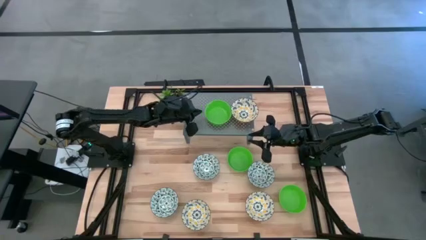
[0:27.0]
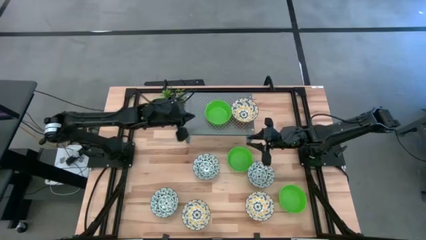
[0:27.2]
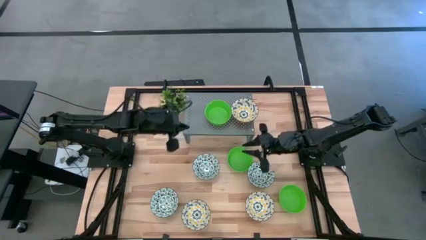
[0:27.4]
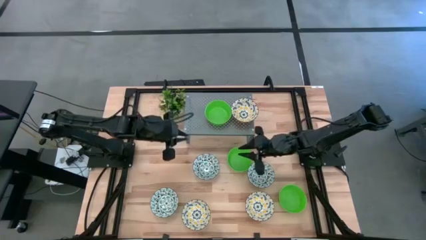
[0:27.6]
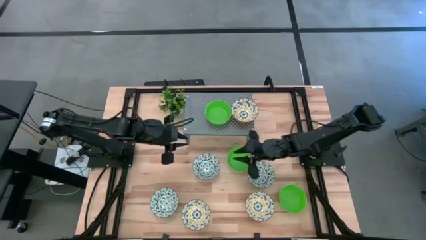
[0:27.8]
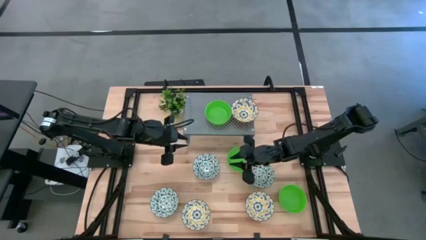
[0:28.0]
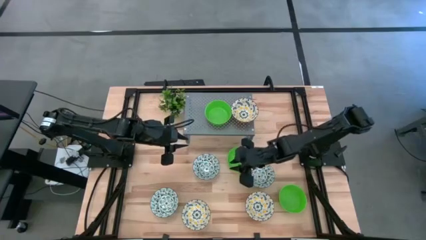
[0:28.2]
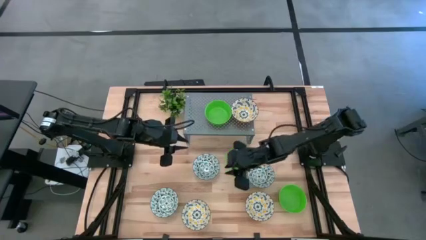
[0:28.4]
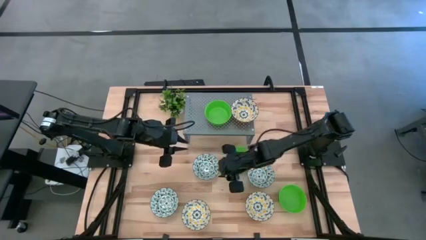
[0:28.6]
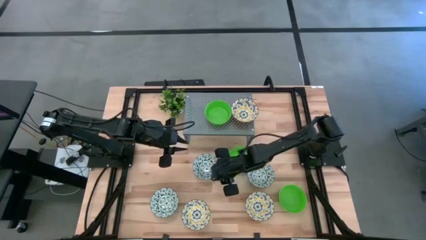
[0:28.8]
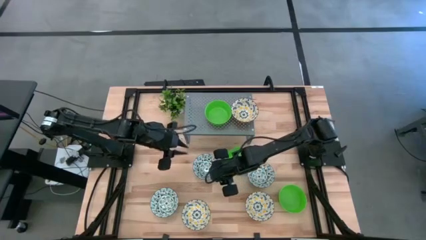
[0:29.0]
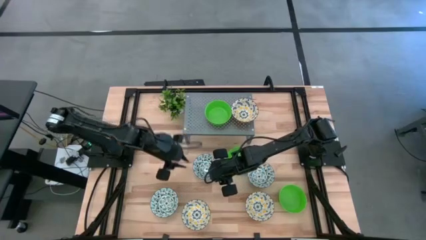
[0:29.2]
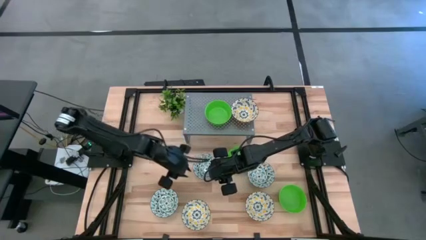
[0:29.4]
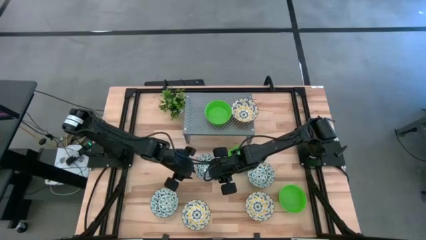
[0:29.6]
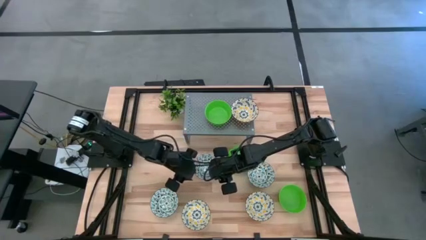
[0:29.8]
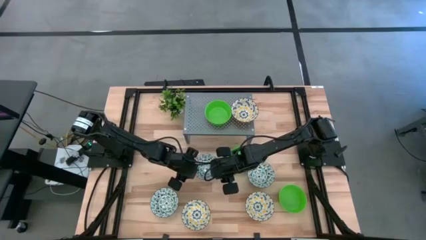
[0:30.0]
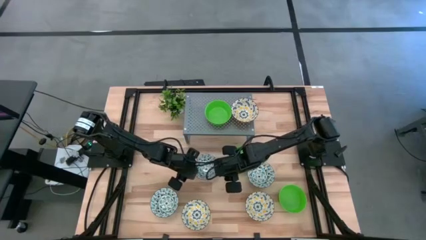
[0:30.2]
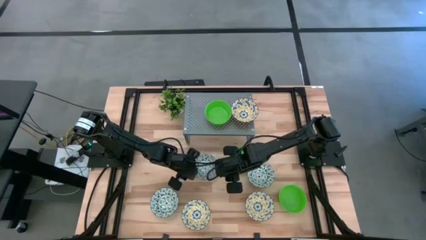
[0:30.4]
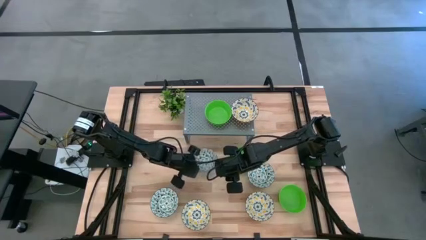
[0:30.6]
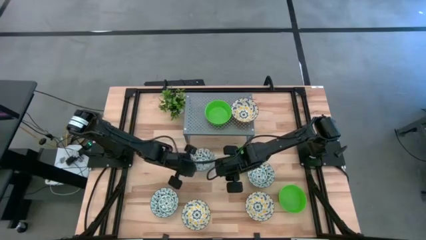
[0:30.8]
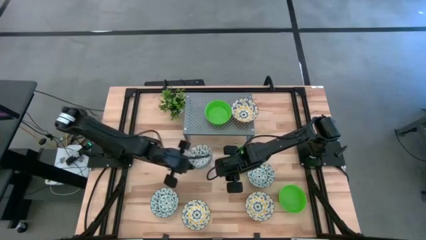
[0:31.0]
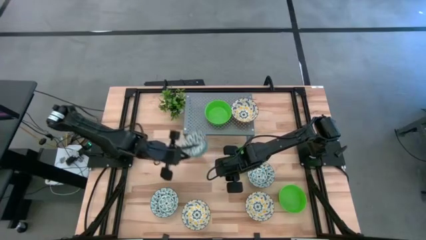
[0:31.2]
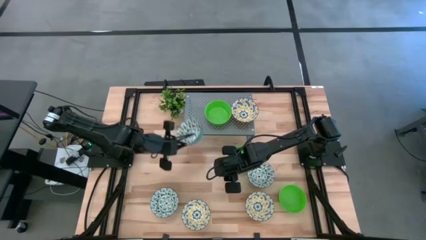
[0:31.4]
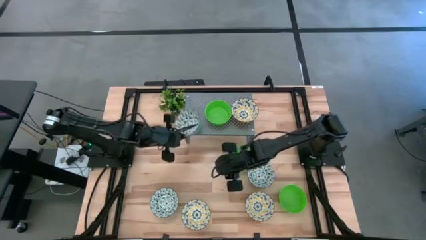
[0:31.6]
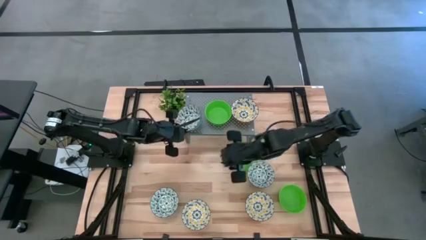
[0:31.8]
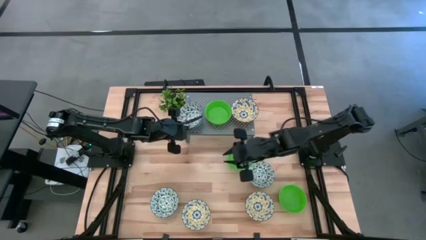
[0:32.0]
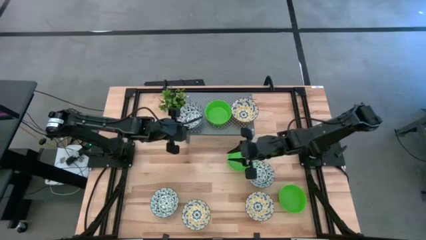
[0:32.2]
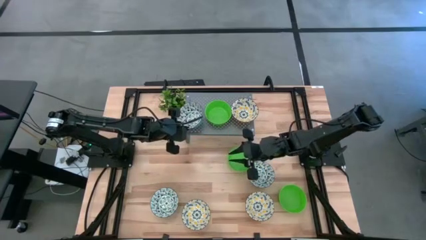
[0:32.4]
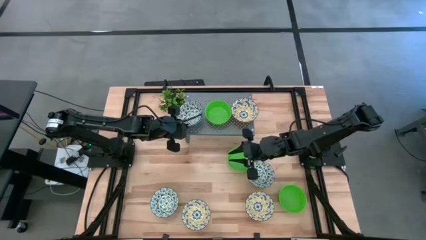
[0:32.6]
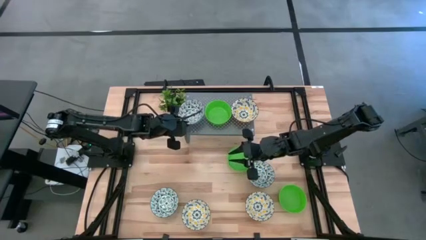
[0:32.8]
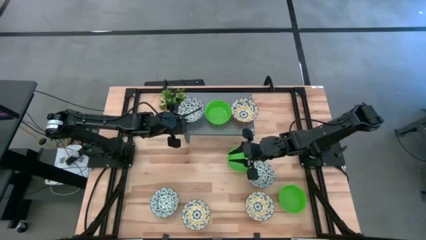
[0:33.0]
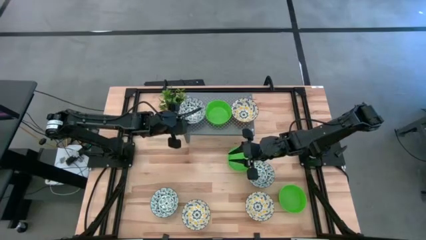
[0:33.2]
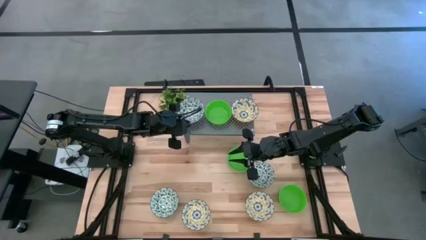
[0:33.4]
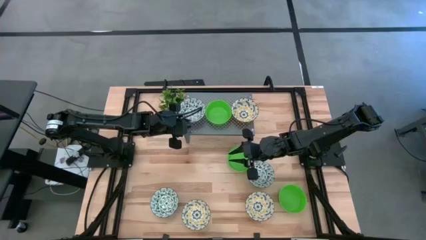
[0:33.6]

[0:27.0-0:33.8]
Task: Pick & Place Mini bowls
Put the middle blue and white patterned bowl on the shelf

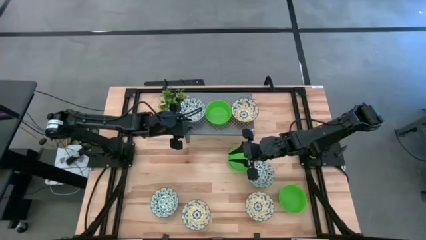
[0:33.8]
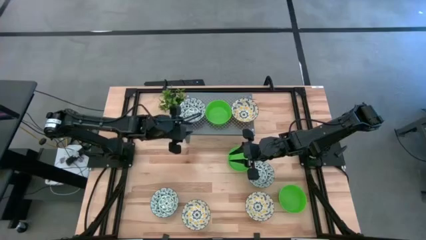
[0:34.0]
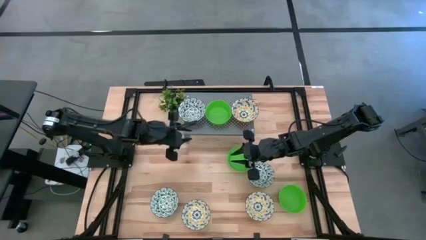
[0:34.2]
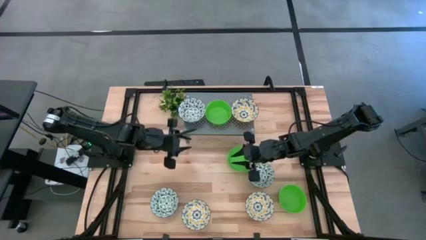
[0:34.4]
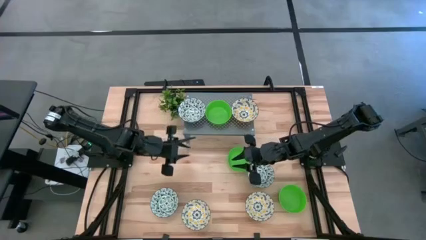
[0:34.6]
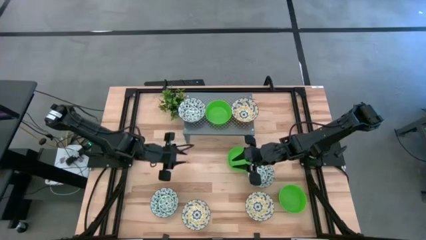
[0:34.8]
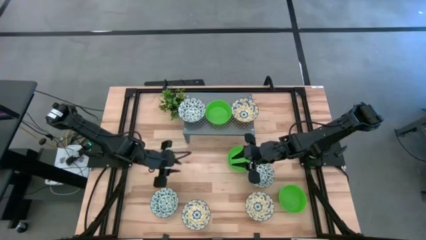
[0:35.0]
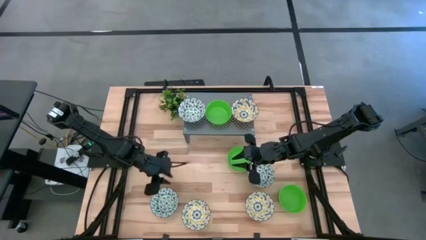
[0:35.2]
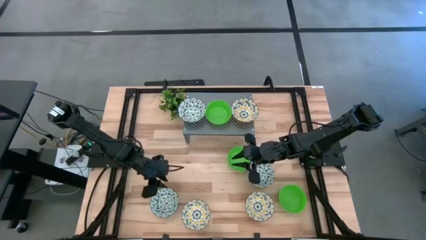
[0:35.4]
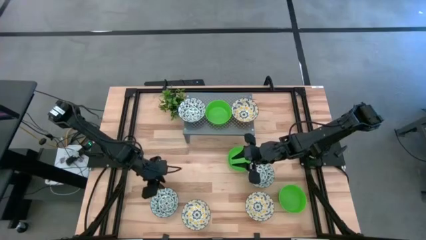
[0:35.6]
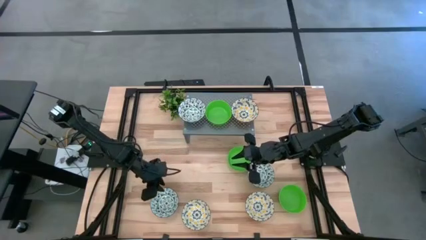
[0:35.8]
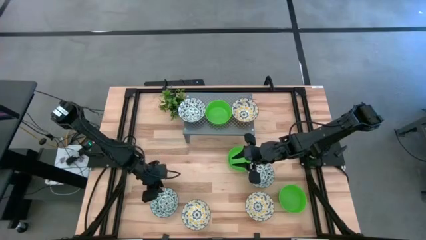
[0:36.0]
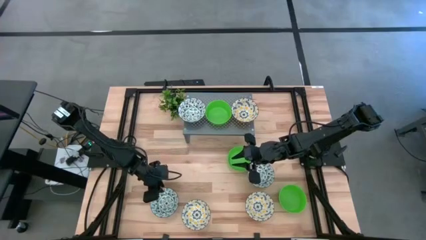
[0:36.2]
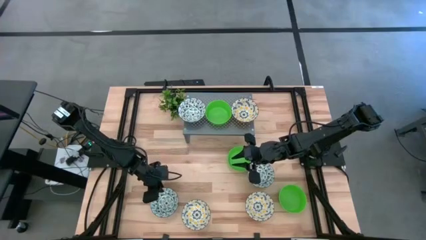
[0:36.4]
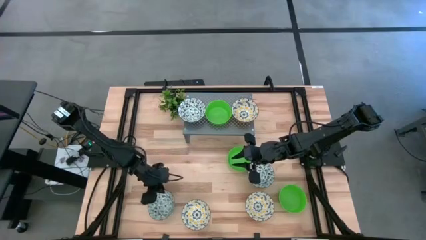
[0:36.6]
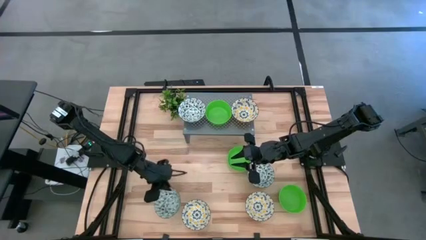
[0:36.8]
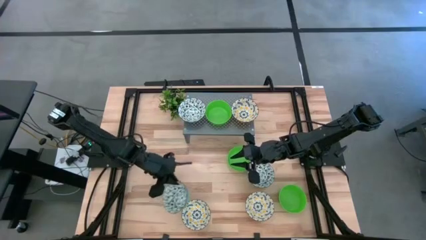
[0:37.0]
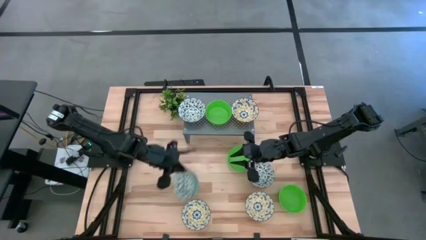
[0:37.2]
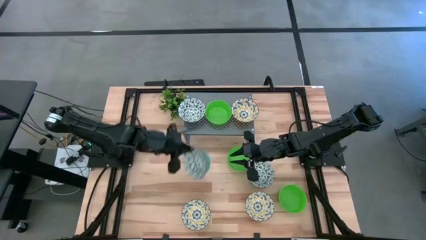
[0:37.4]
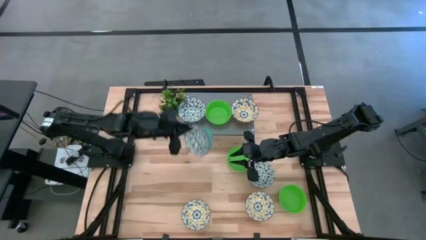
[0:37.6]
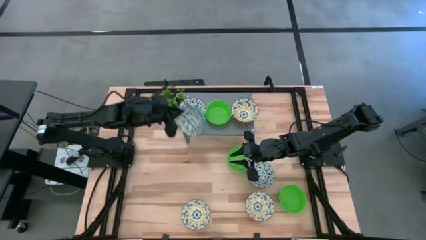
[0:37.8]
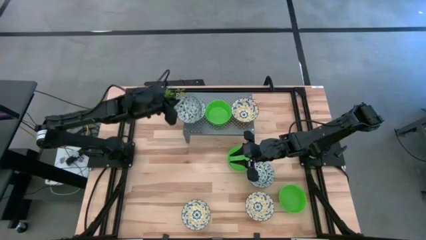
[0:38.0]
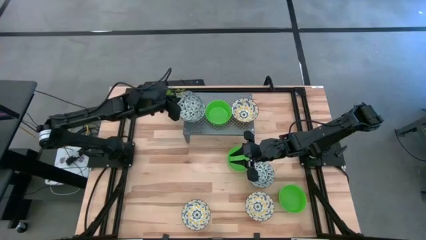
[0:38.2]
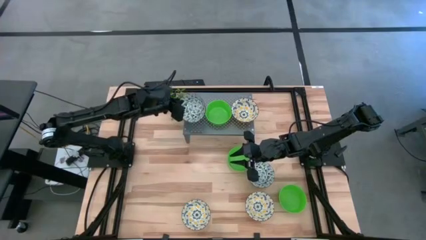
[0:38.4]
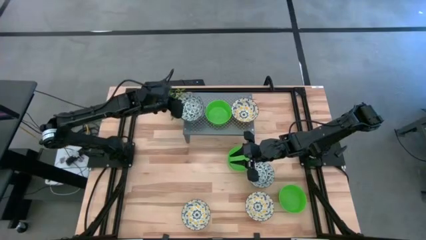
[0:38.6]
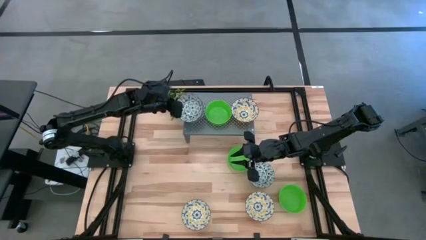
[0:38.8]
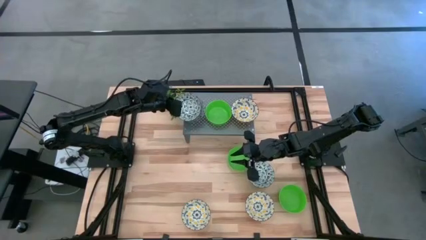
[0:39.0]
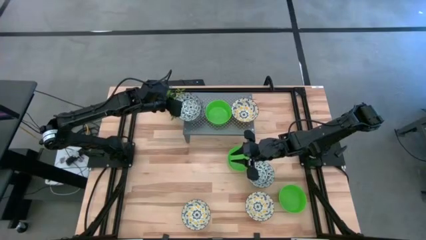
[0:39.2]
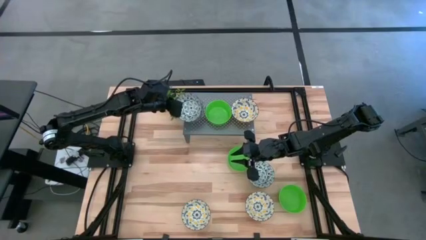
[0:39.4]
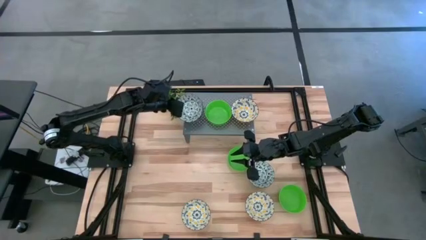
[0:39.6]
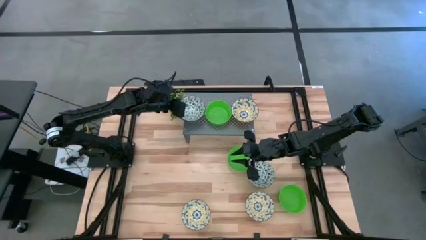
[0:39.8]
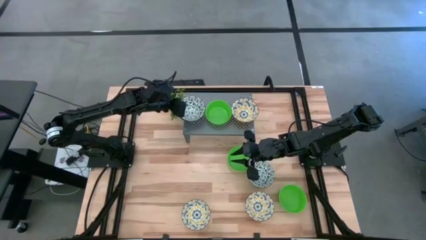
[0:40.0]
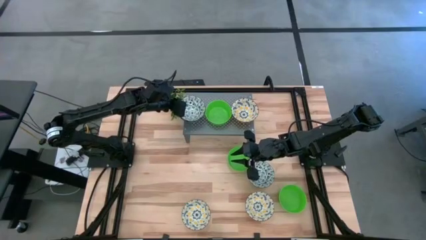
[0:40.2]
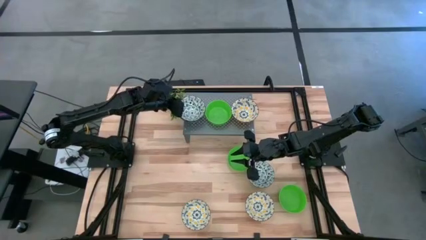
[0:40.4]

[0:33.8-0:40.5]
Stack the left blue and white patterned bowl on the blue and white patterned bowl on the shelf

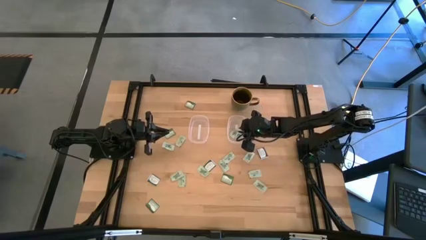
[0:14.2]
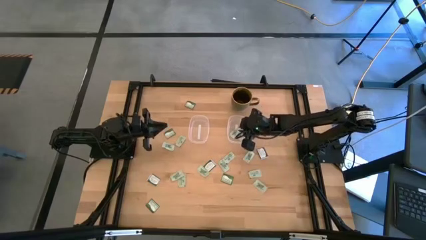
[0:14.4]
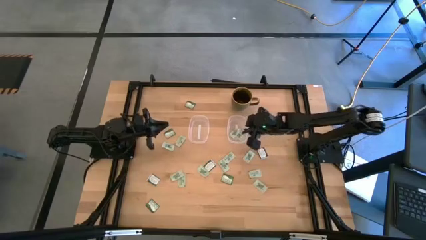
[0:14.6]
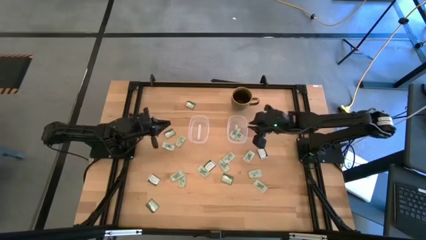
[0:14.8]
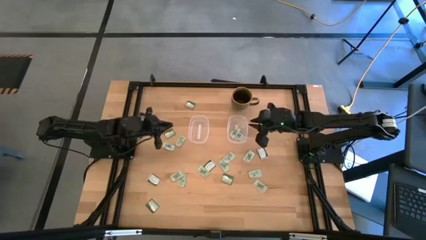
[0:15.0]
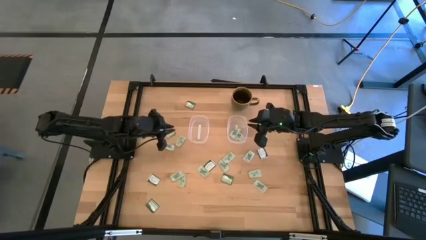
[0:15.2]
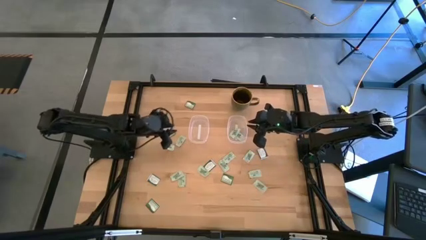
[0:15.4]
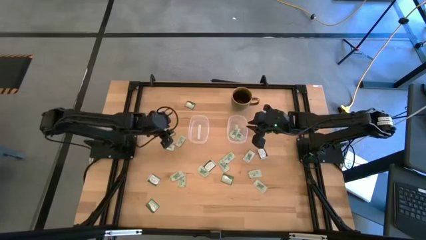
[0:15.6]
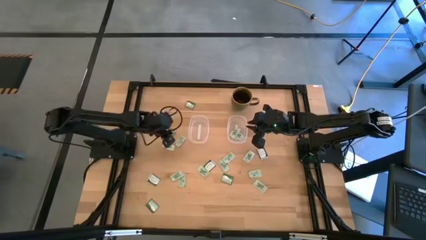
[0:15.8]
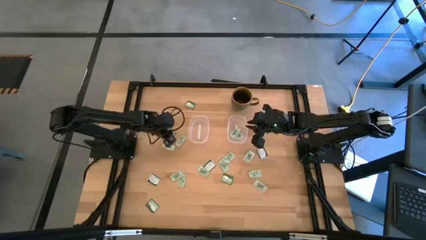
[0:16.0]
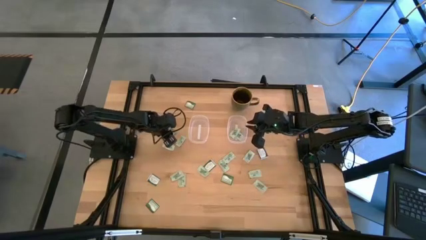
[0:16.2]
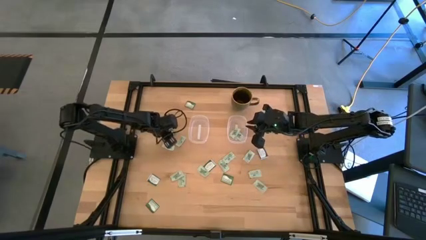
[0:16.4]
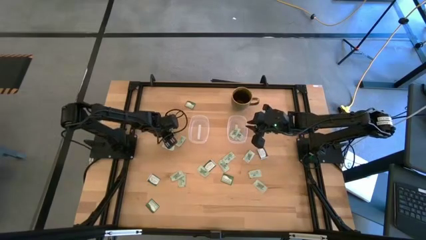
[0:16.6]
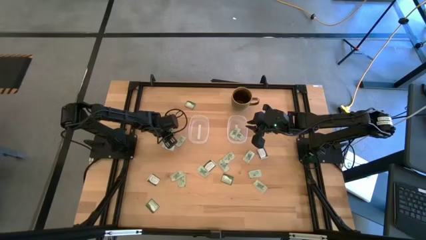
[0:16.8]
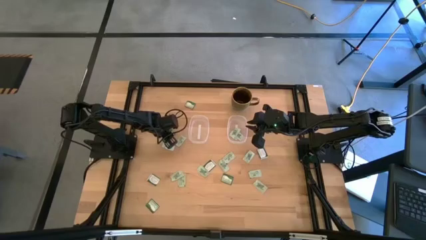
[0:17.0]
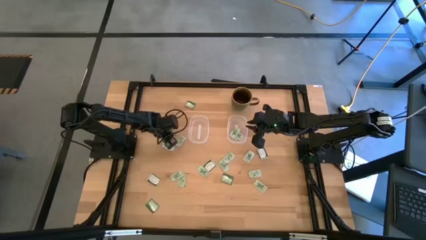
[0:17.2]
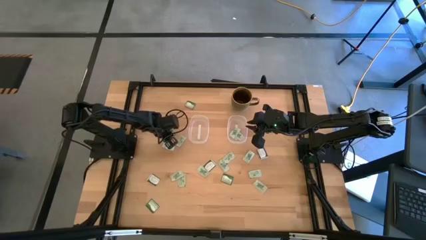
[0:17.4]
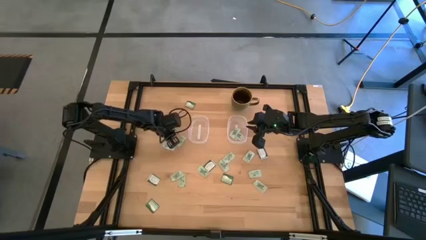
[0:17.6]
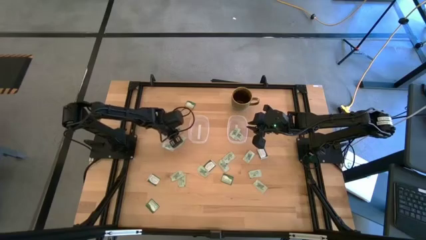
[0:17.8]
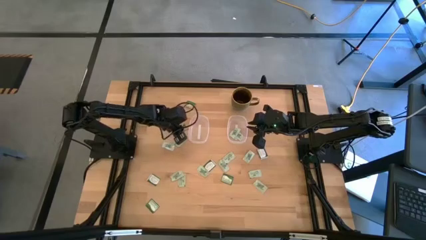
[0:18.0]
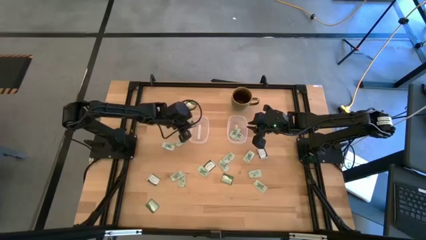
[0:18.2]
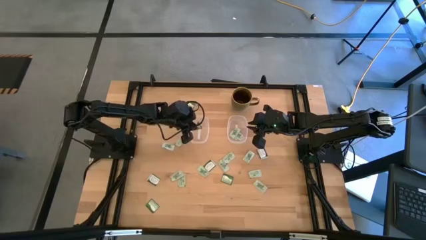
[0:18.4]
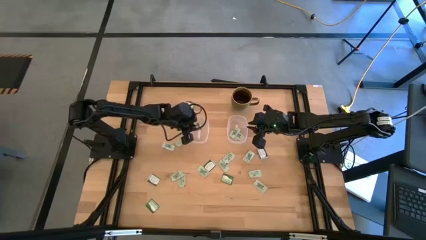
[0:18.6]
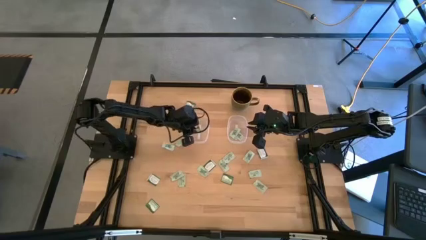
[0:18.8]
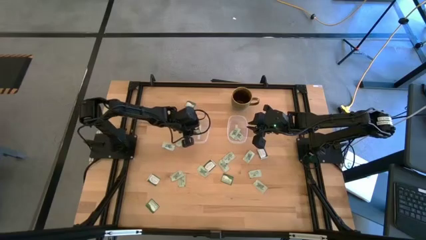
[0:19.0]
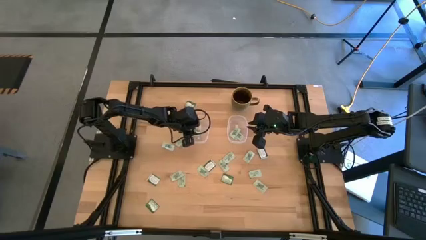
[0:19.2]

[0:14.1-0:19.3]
Task: Pick and place items into bin
Put the truvia packet into the left transparent bin
